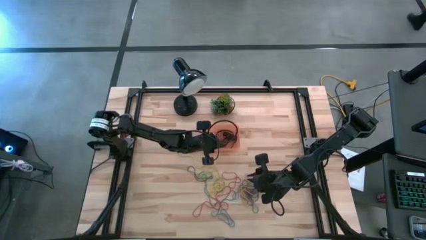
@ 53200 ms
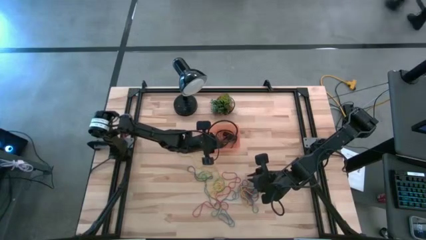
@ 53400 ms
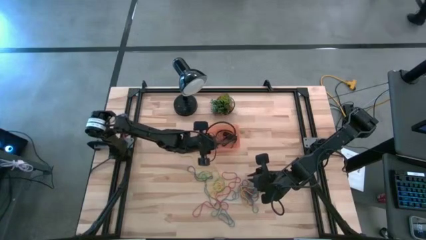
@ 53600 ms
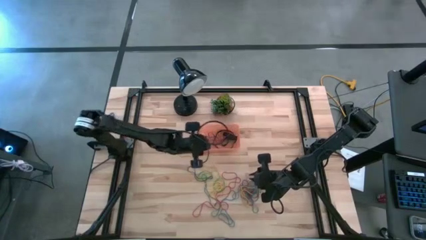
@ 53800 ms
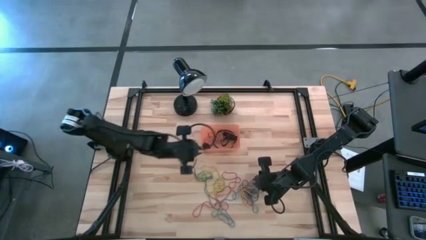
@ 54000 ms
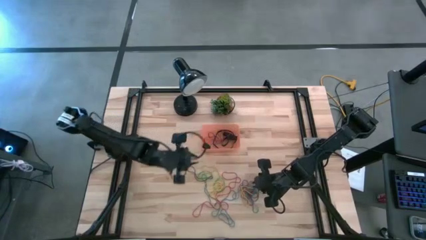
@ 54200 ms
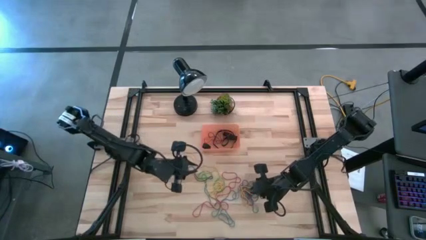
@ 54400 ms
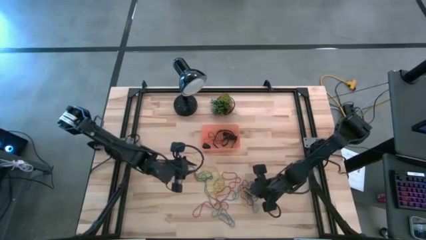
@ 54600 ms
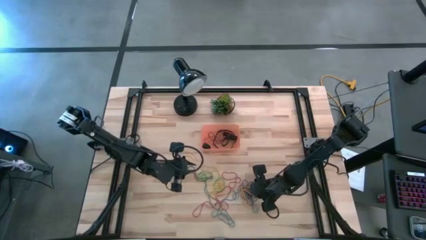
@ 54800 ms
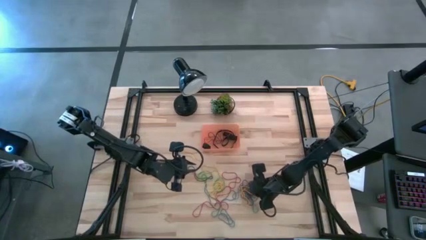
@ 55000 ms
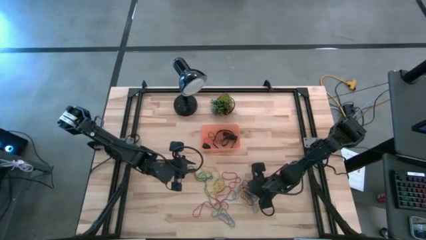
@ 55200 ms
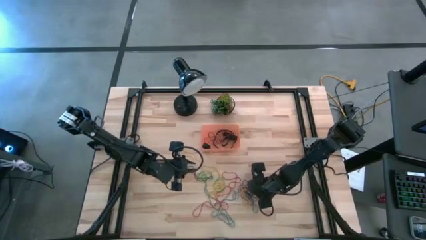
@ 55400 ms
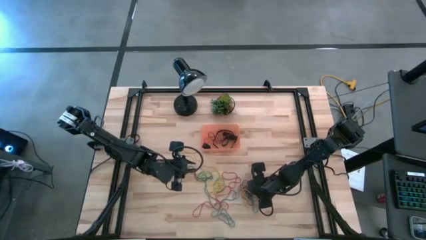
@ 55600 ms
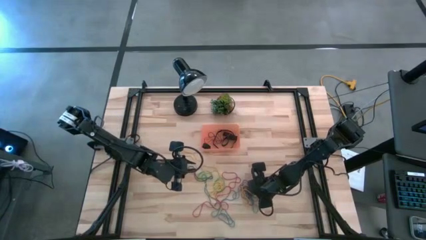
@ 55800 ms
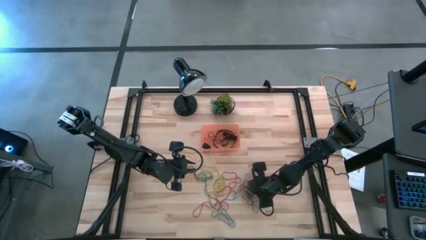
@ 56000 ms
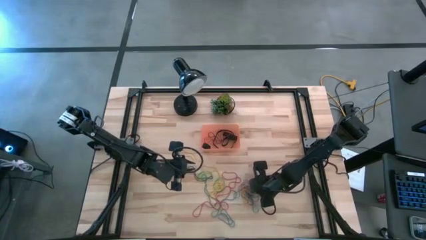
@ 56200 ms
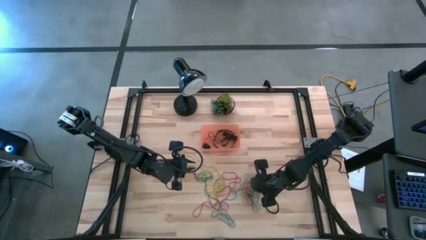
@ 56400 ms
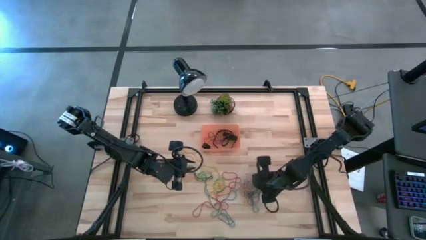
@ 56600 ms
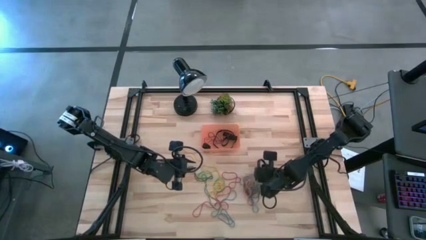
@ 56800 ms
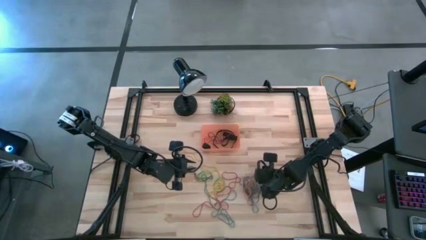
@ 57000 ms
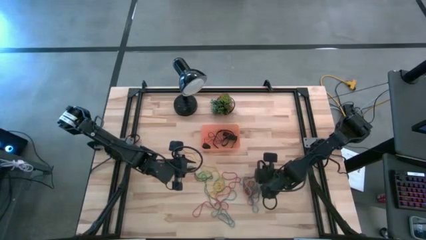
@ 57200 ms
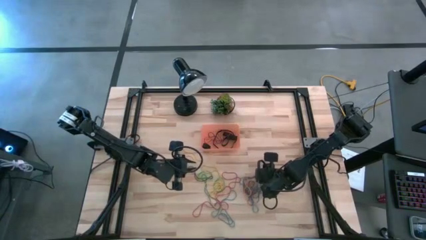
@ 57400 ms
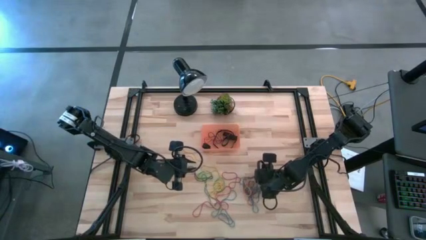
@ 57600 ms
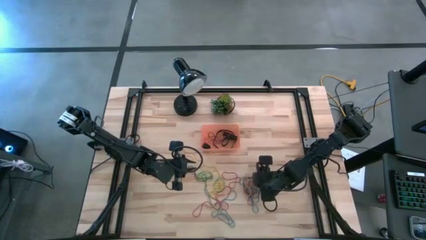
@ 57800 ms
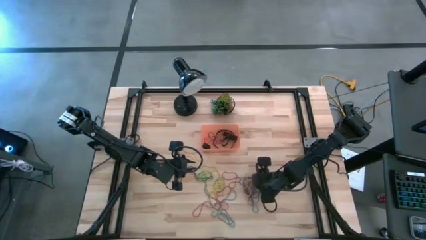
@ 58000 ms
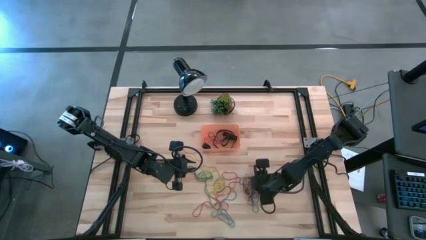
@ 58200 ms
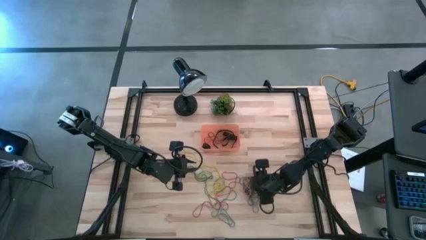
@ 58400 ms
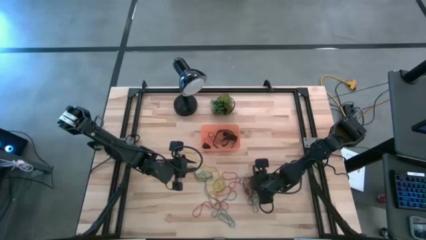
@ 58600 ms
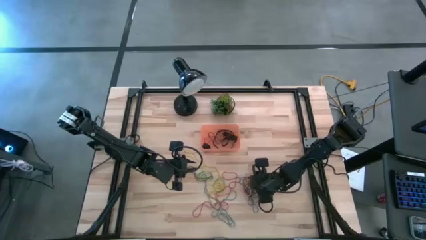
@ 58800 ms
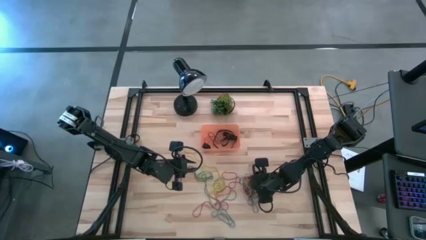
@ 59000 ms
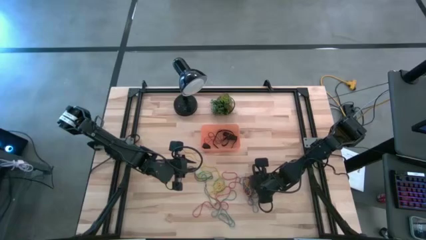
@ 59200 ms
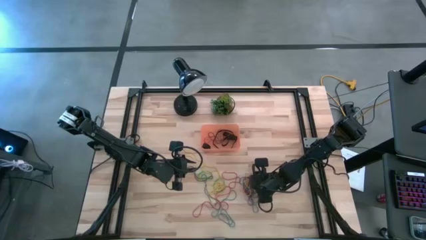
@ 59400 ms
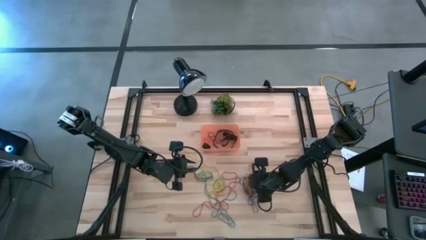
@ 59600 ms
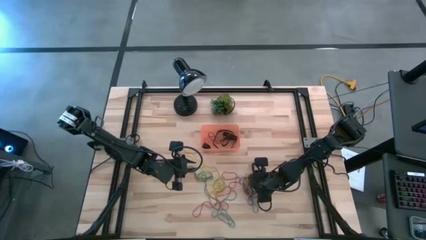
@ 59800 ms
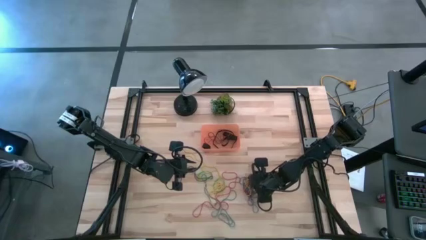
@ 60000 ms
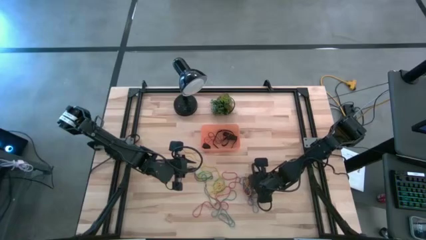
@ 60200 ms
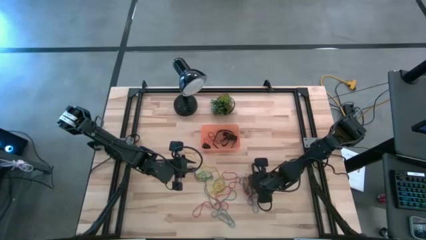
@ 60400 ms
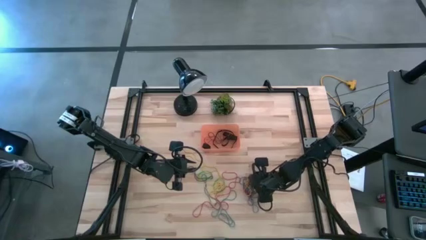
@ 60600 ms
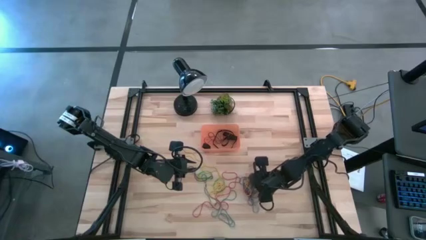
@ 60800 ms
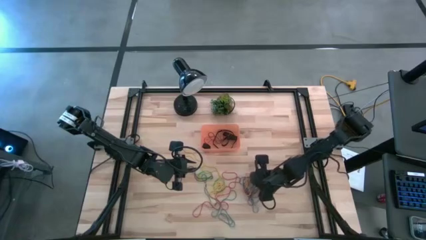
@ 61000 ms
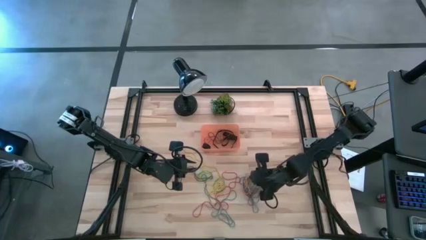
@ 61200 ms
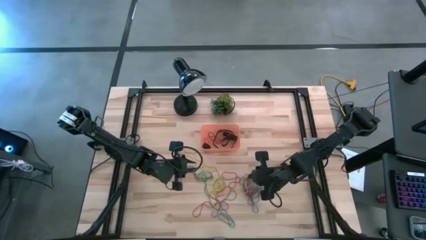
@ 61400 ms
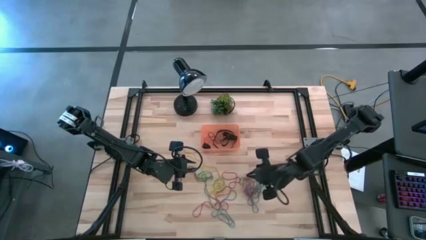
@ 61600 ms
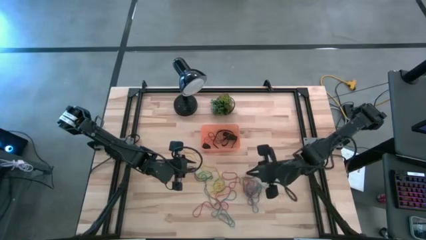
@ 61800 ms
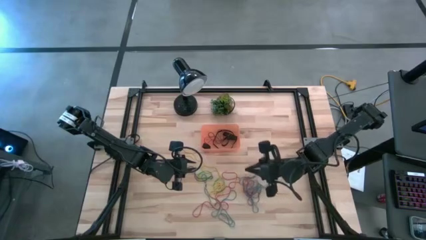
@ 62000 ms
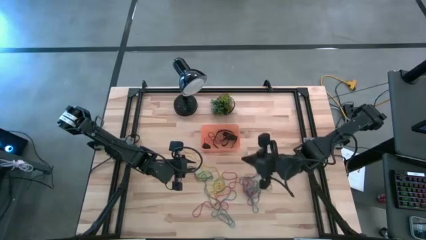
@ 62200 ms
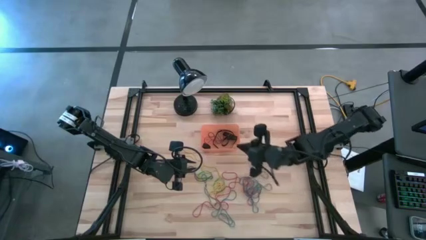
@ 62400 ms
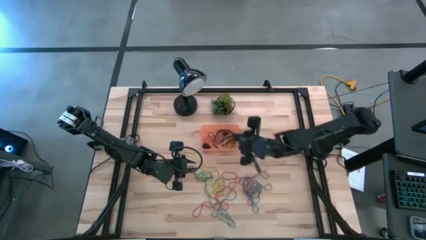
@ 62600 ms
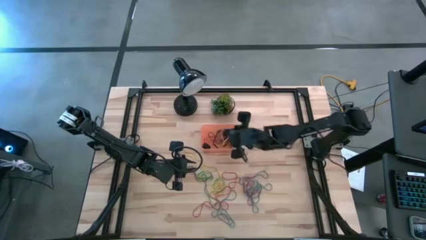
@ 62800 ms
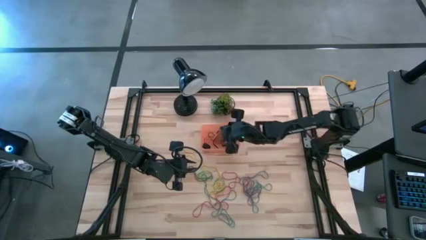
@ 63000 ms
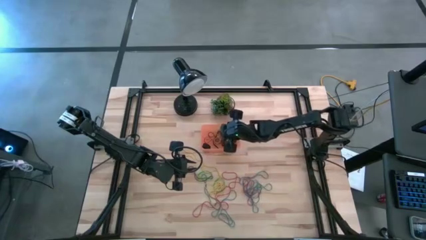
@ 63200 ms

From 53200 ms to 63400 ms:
Task: Pick and place rubber bands into bin
Put the yellow rubber band into the orange bin

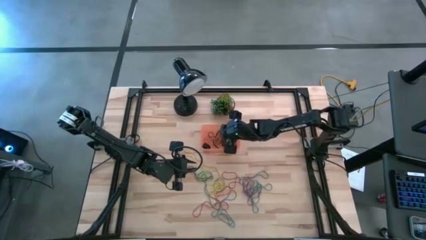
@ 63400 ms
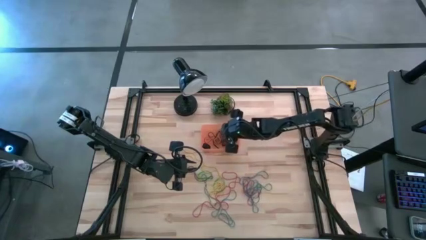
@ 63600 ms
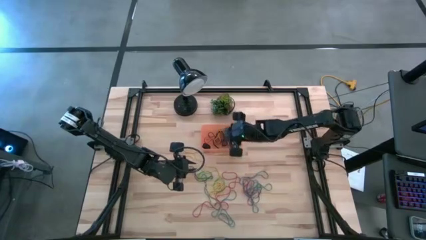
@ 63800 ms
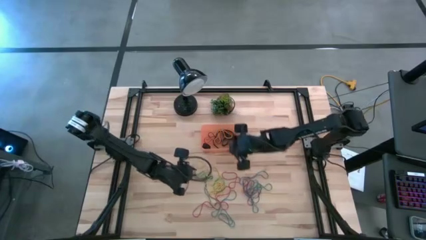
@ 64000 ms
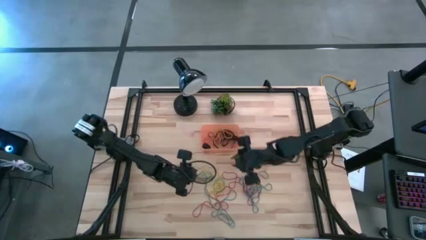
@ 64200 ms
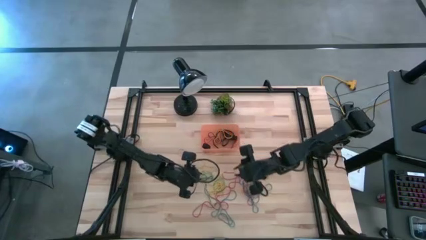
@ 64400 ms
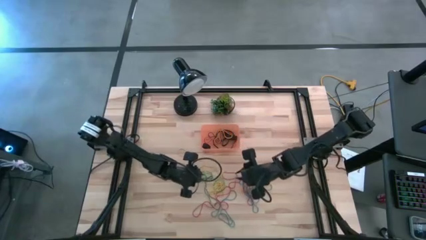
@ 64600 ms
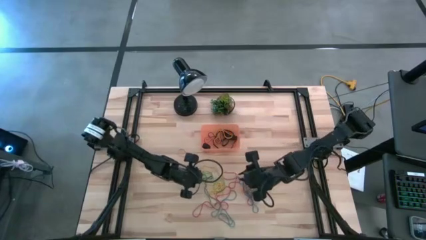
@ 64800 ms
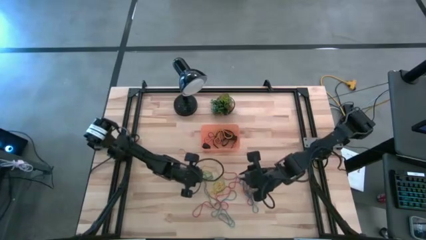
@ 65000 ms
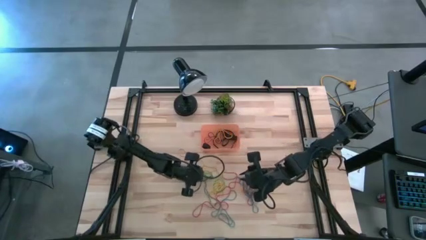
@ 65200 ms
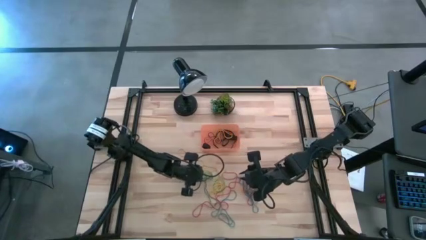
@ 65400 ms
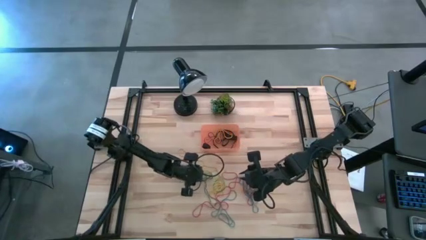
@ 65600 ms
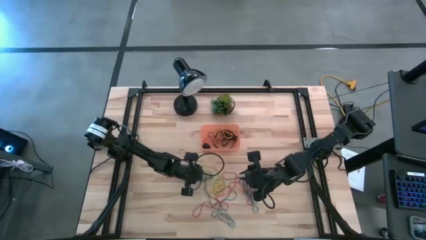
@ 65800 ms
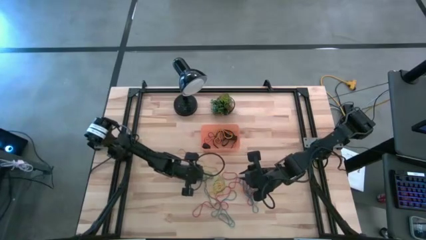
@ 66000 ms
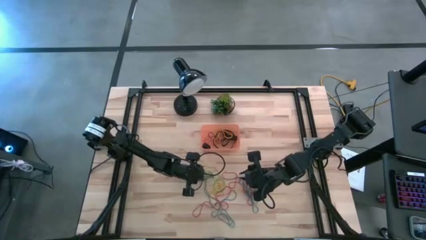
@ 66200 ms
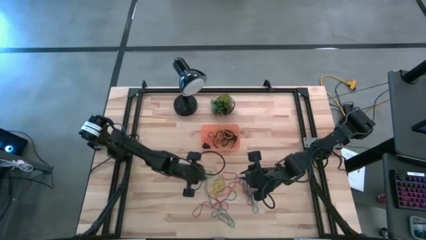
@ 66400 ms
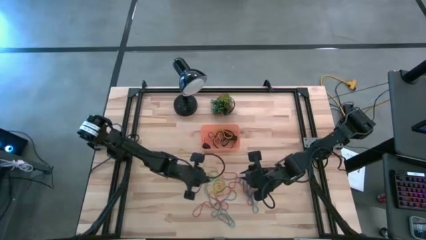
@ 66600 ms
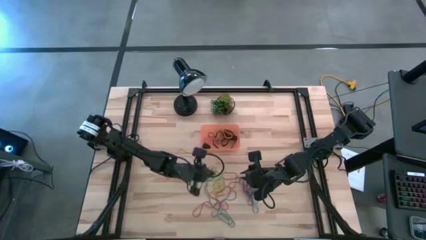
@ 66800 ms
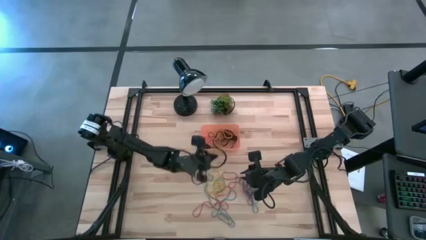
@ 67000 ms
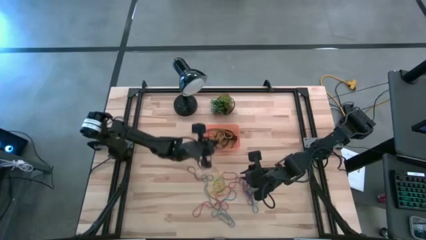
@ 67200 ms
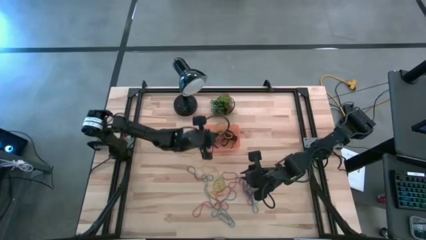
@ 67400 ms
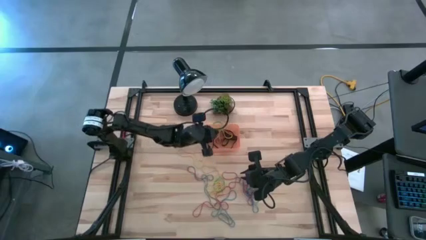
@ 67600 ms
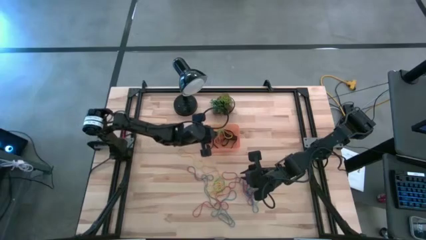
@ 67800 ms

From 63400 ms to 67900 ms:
Put the green rubber band into the orange bin

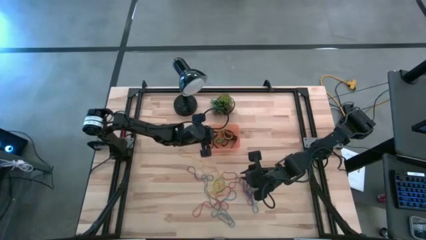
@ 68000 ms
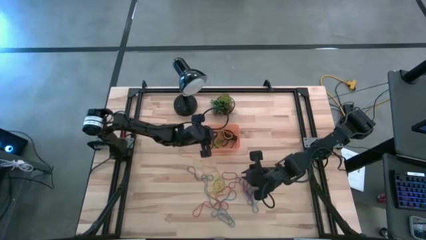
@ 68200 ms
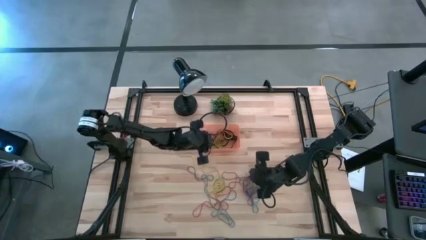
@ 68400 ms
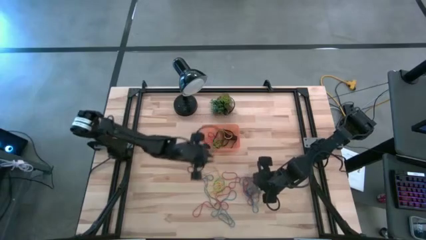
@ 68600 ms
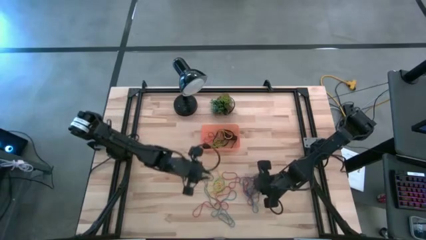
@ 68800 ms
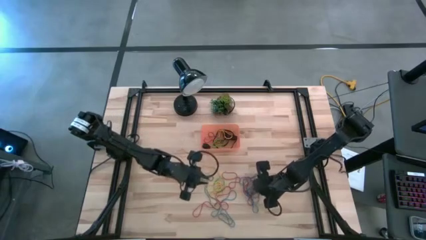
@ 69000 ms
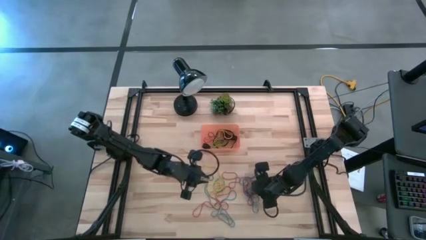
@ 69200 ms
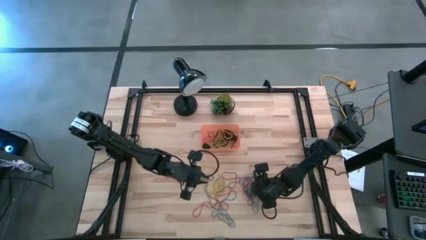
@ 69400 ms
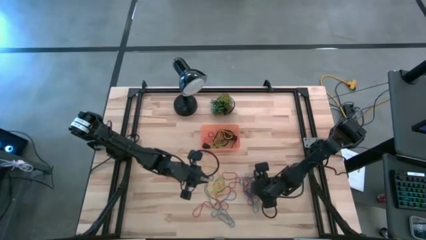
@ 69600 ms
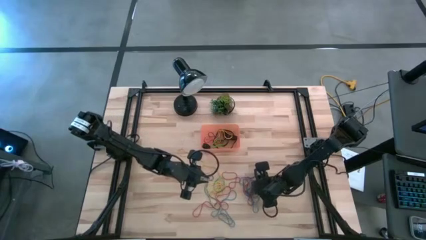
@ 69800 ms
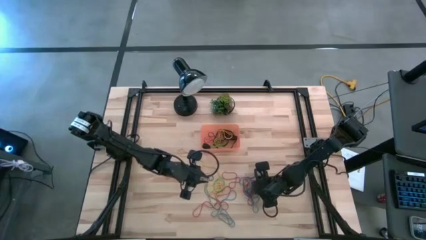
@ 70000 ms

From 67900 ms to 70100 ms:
Put the blue rubber band into the orange bin
